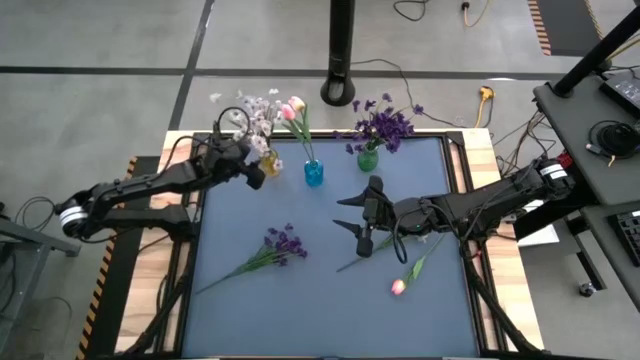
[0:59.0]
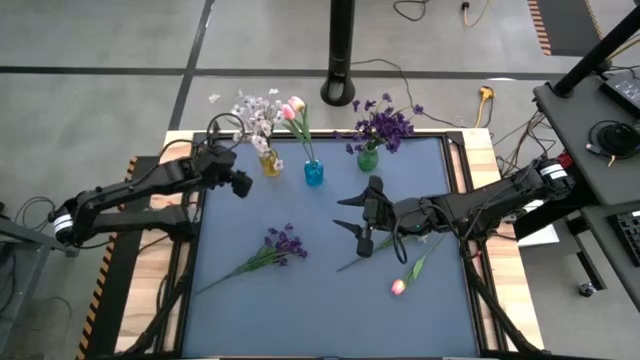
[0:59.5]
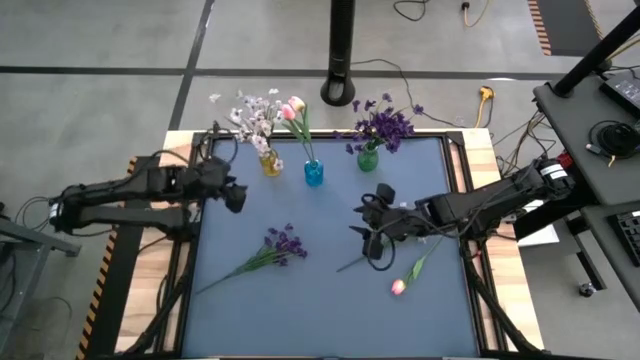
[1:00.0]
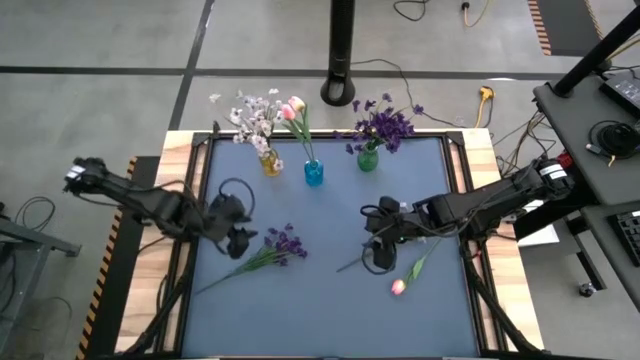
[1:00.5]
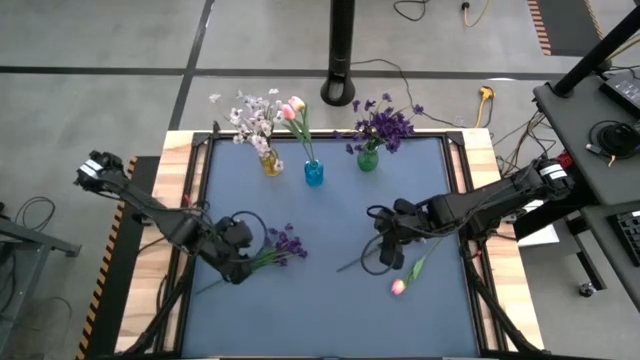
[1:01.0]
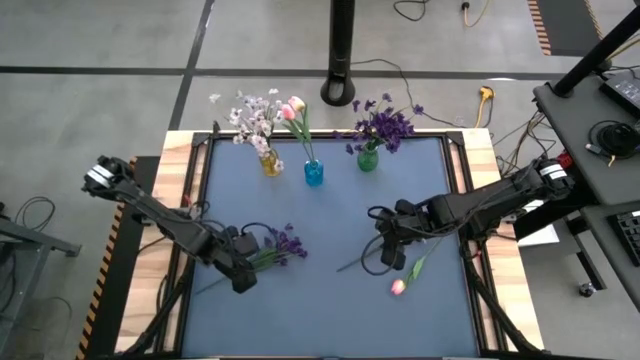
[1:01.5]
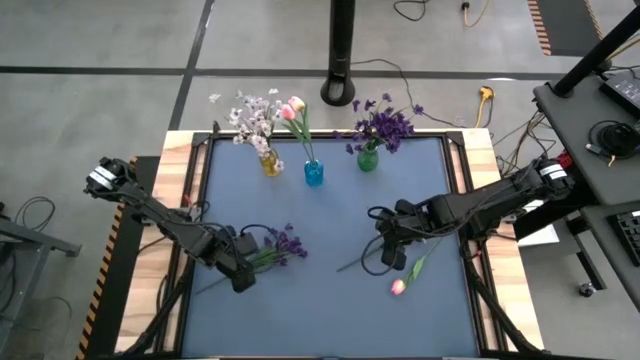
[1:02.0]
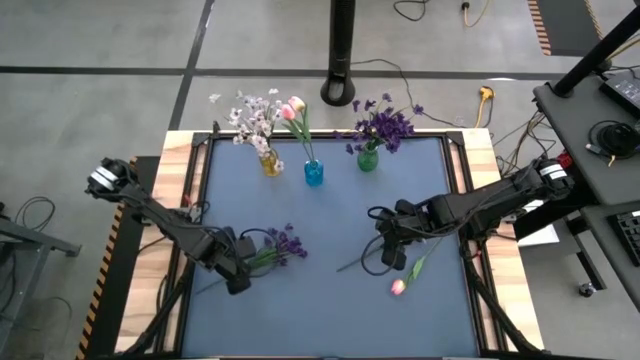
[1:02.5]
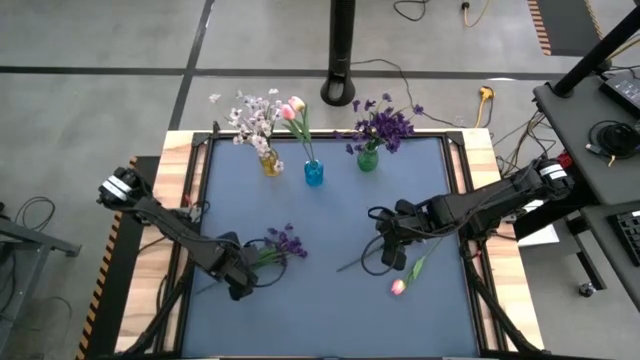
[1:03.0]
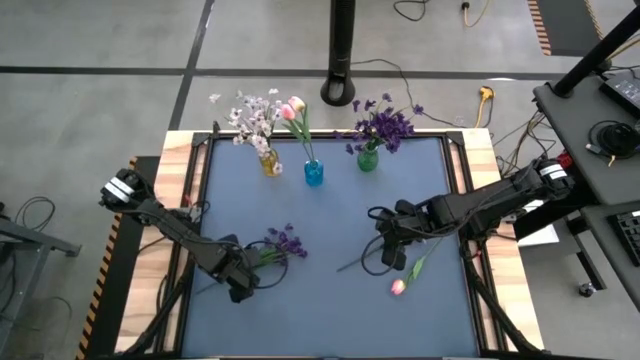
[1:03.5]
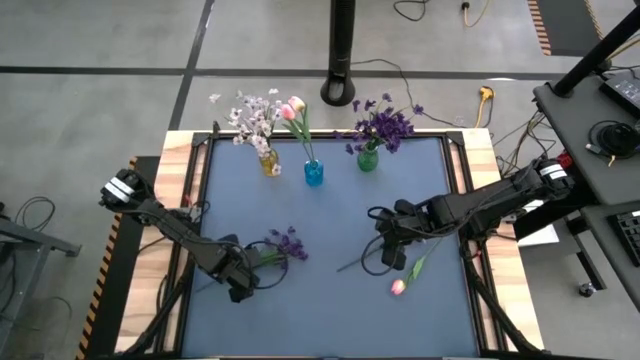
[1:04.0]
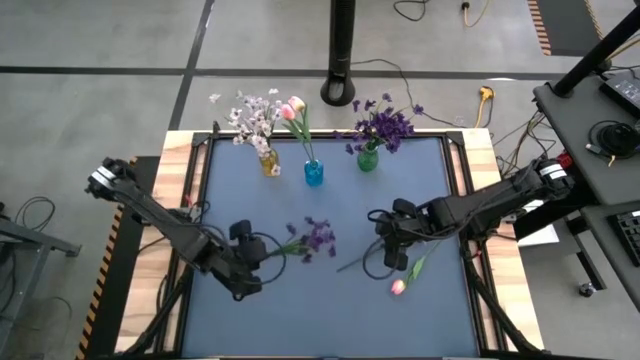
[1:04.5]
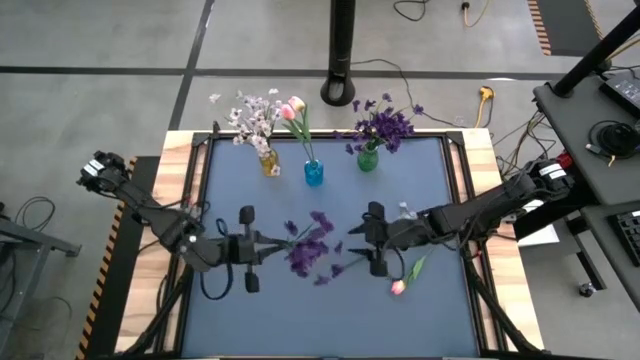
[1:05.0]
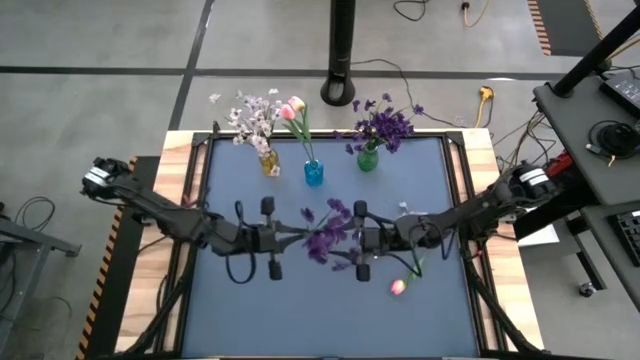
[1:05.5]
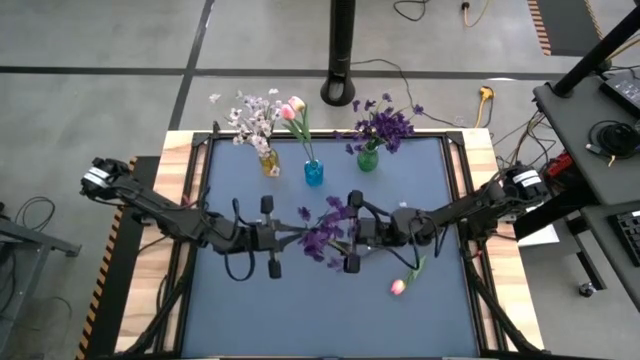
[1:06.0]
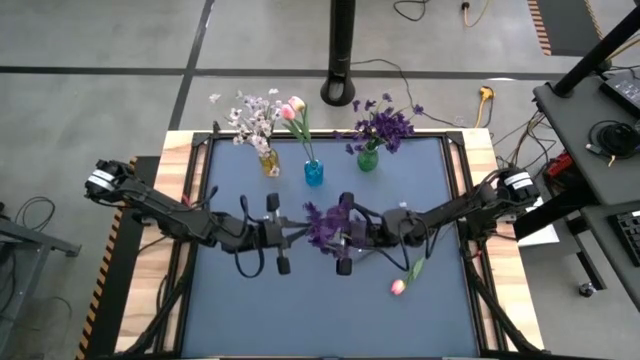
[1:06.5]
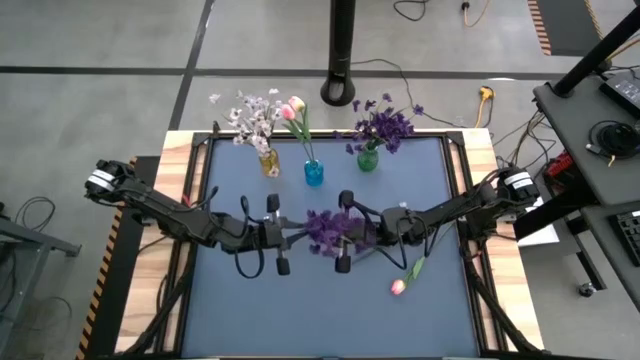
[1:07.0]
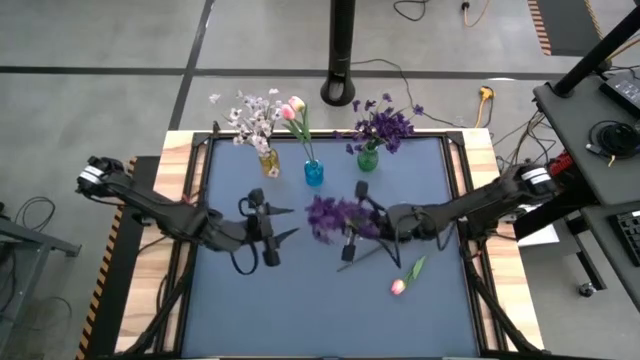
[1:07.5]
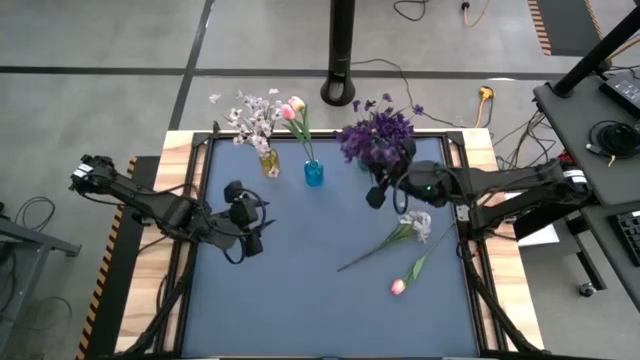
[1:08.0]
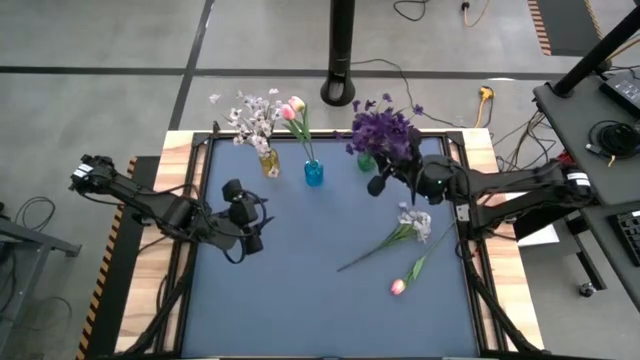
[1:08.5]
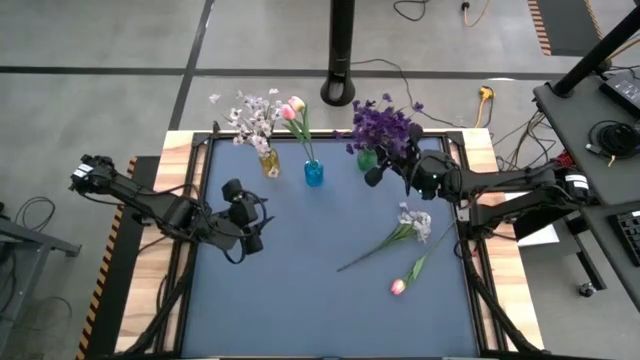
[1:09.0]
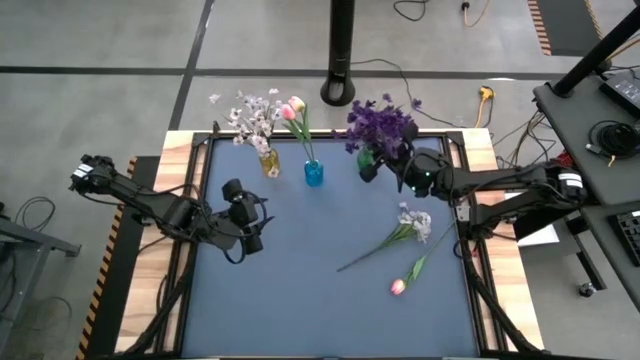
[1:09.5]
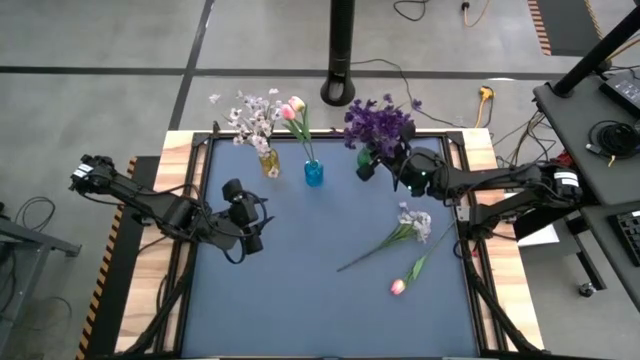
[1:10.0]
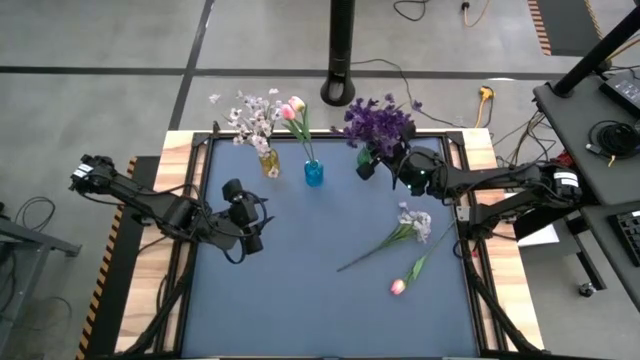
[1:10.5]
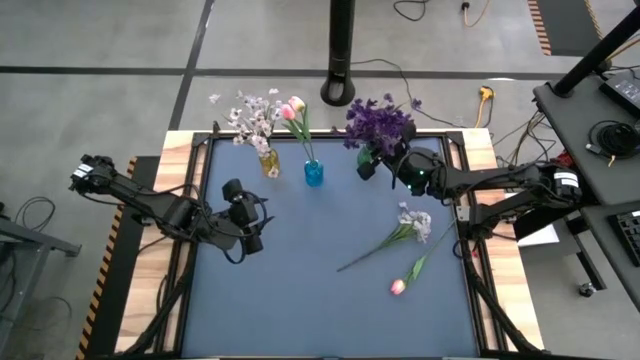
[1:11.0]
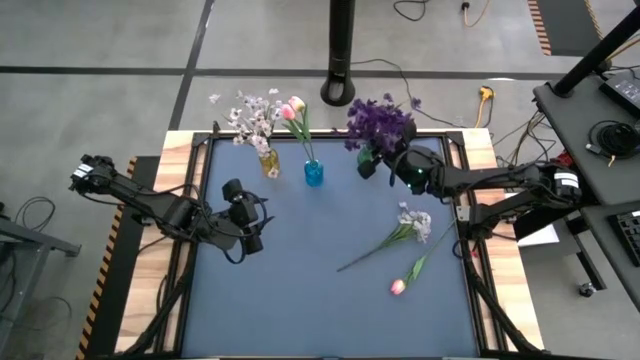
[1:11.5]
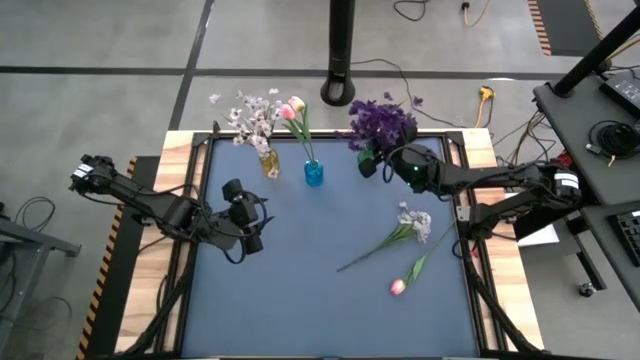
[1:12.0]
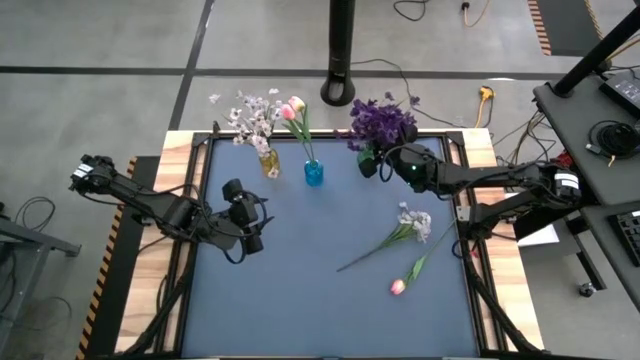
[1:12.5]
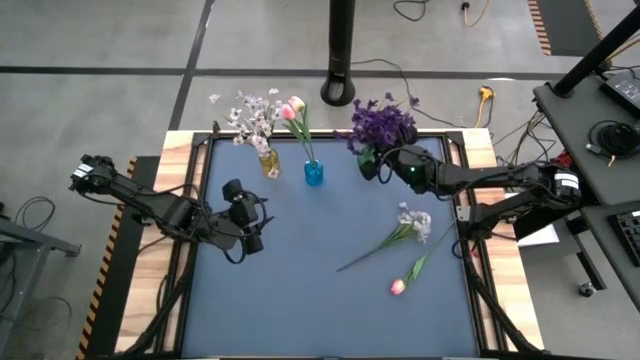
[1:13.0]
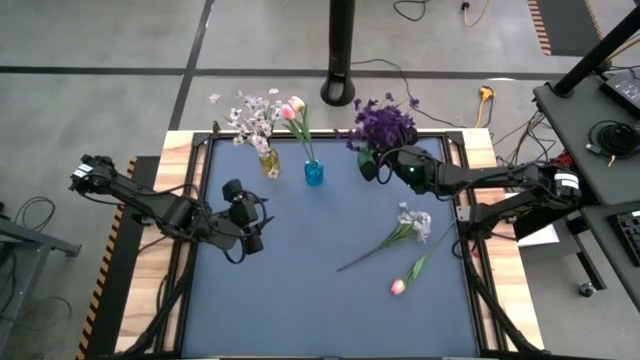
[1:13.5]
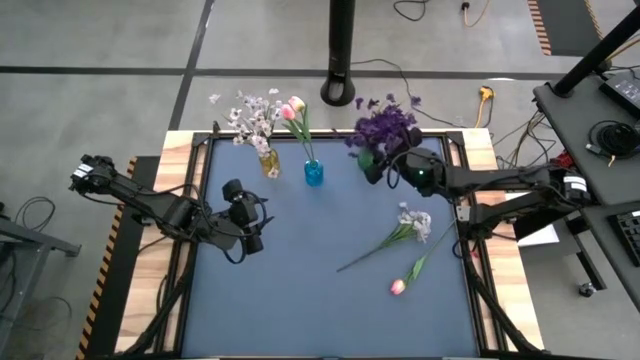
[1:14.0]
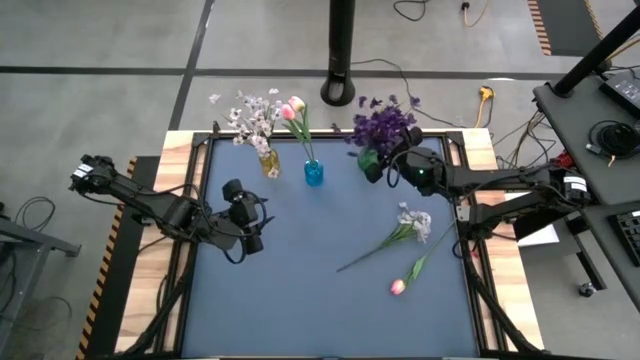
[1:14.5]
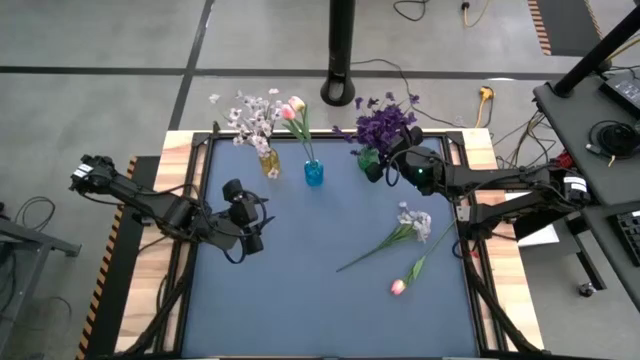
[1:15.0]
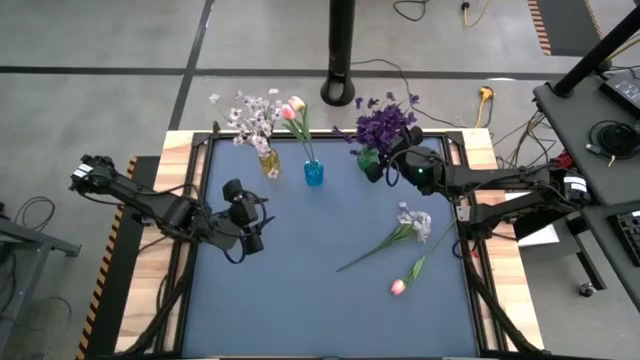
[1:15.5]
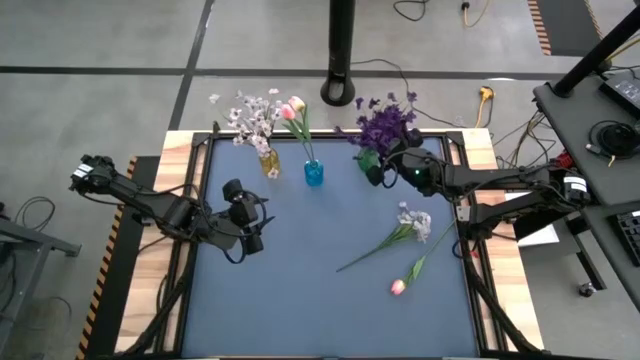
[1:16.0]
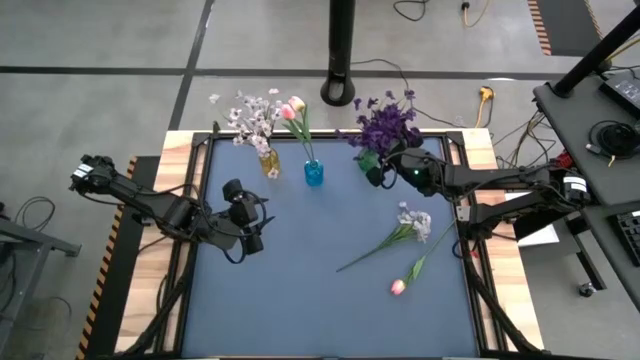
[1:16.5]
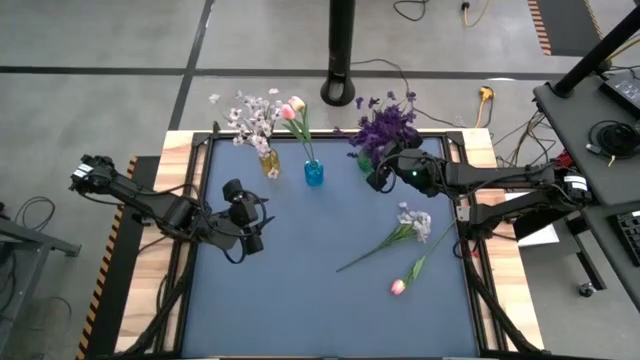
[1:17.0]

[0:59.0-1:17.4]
Task: Sort flowers into vase by color
Put the purple flower into the green vase

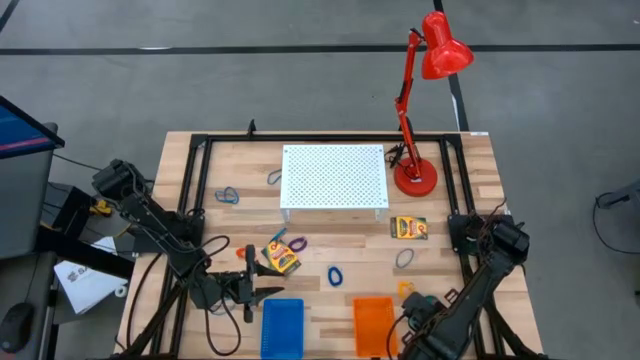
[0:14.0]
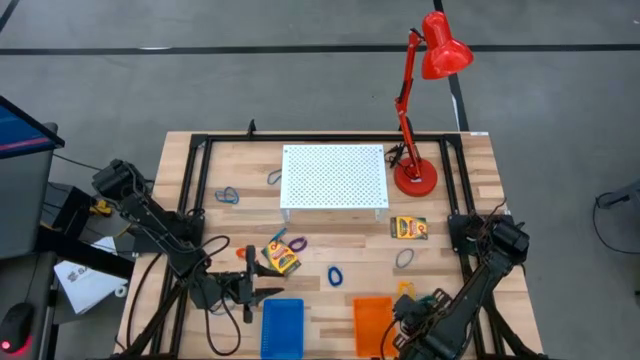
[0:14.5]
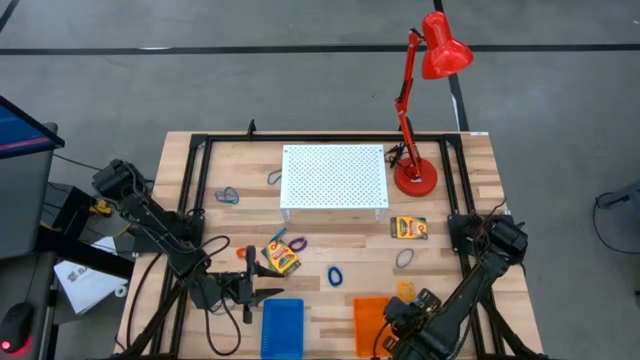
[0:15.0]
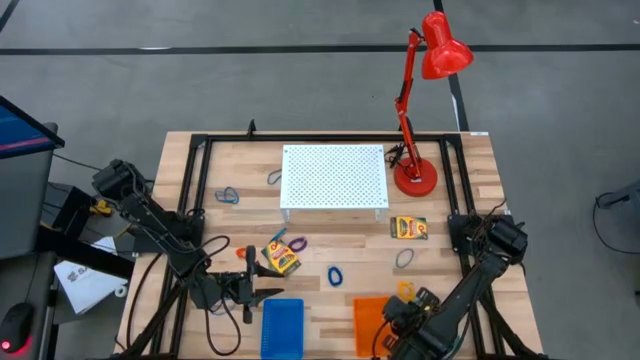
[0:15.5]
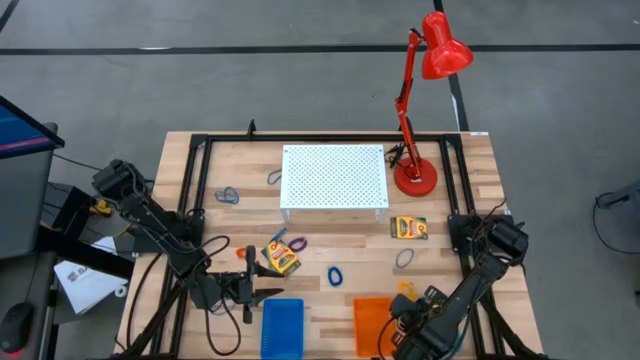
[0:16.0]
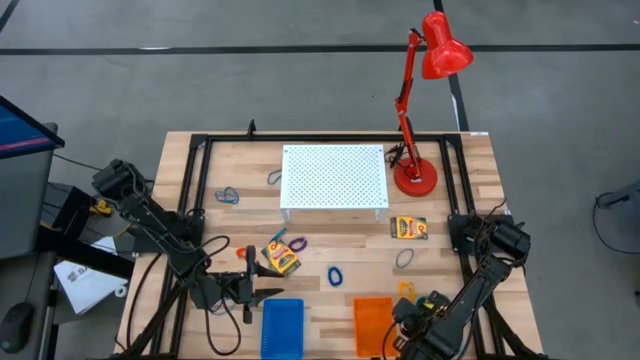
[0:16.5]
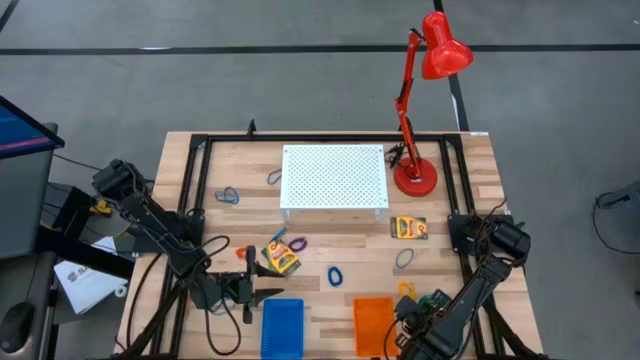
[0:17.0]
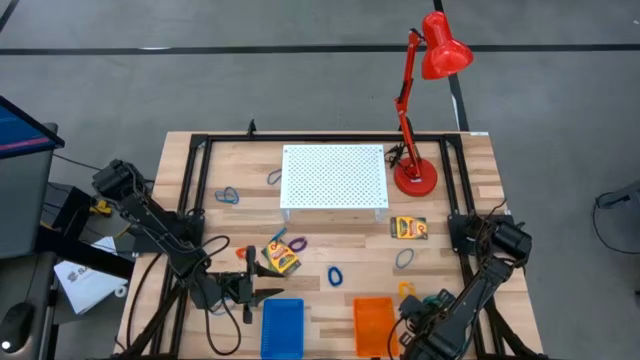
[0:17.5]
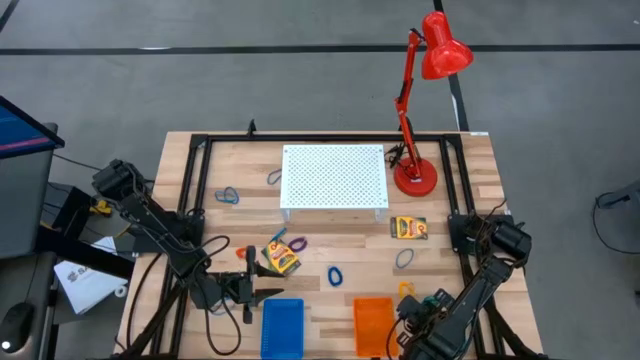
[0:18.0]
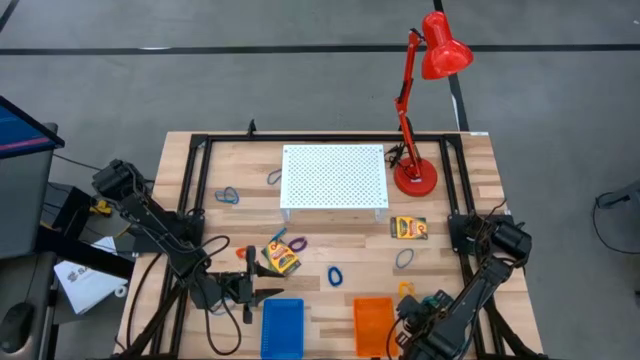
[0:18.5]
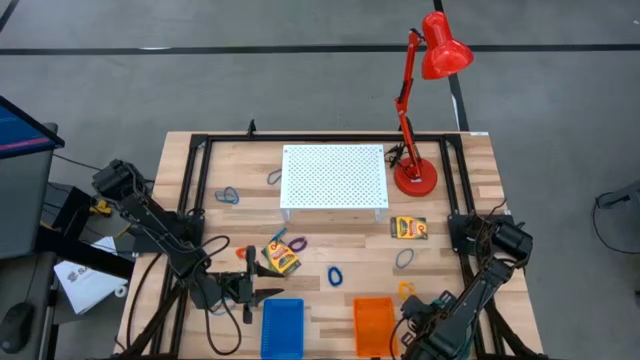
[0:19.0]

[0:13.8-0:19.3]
Task: Pick & Place Office Desk Supplies
Adjust the green bin
